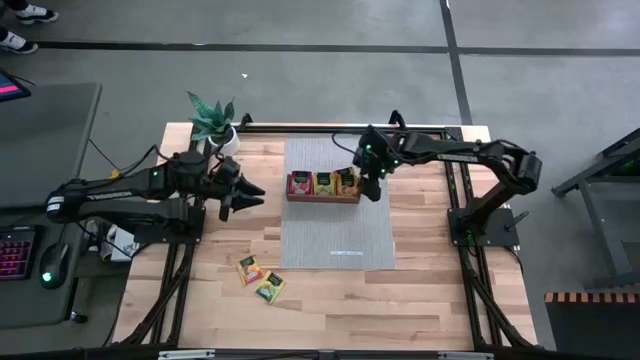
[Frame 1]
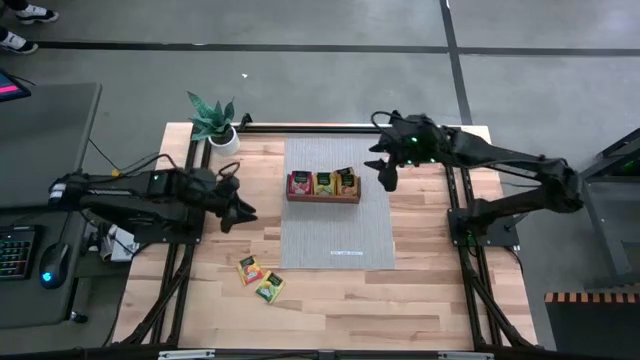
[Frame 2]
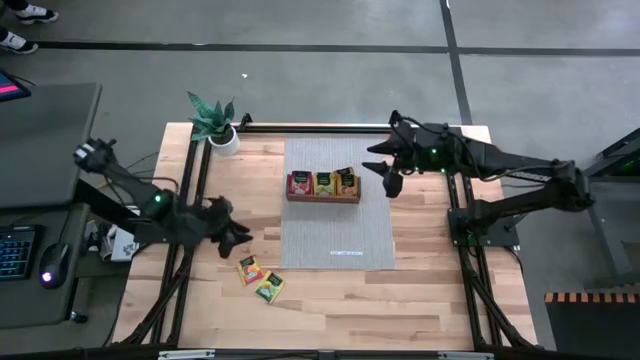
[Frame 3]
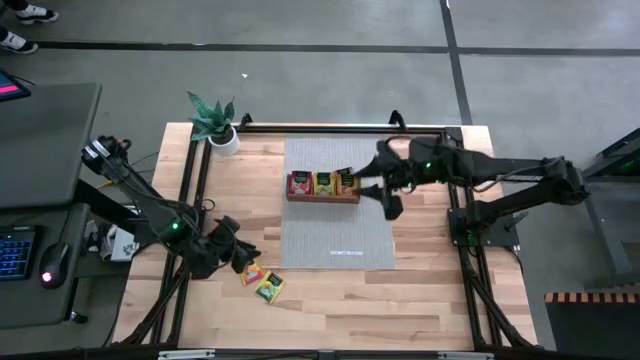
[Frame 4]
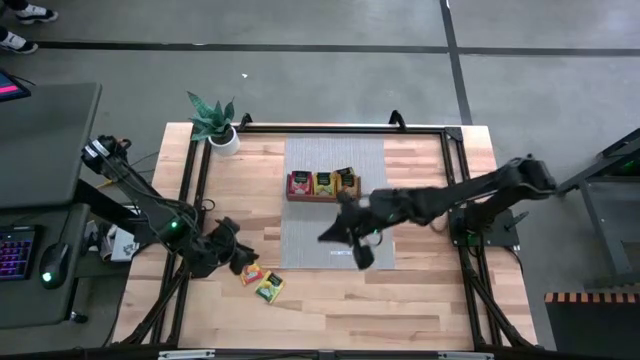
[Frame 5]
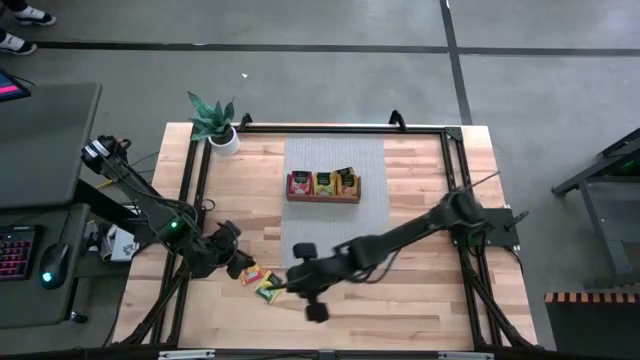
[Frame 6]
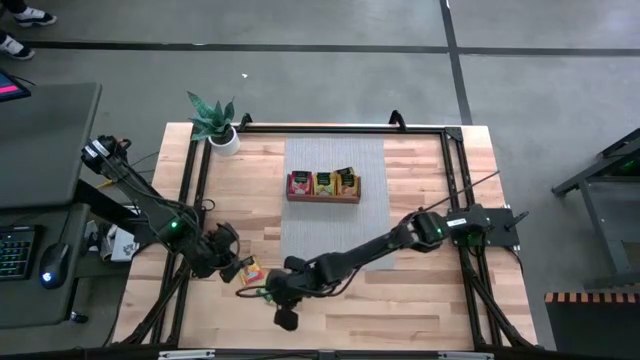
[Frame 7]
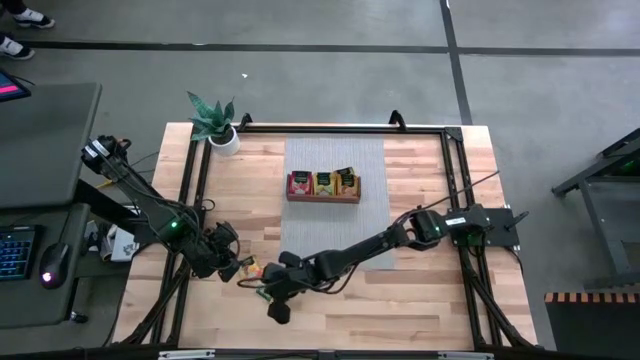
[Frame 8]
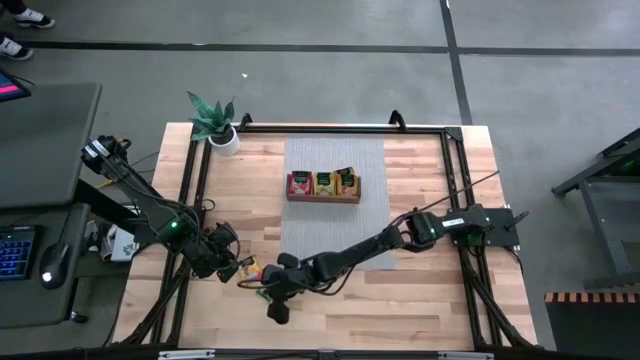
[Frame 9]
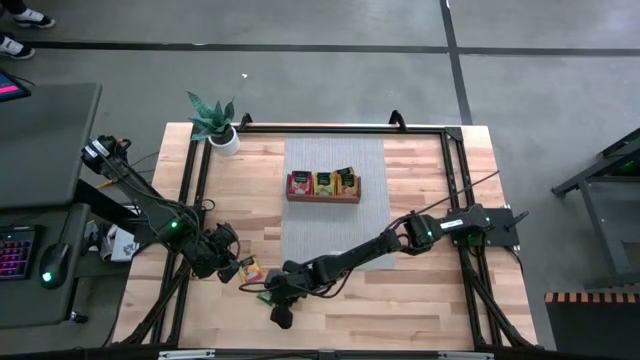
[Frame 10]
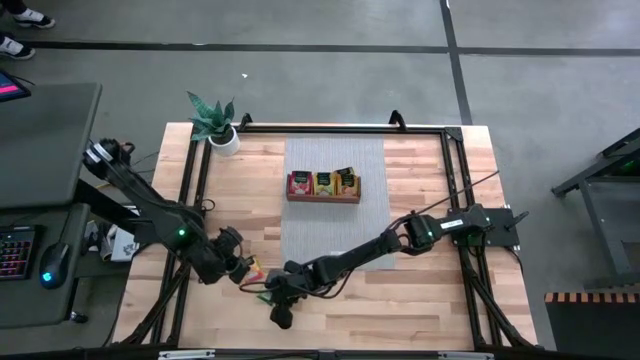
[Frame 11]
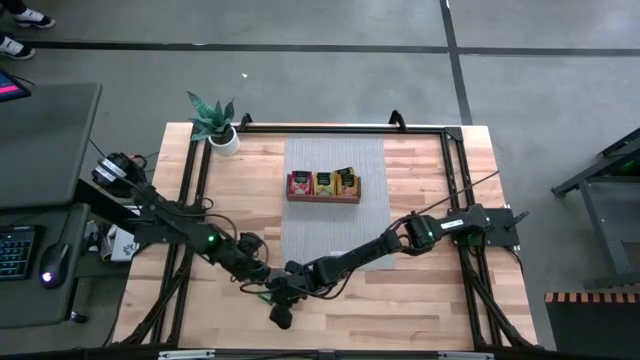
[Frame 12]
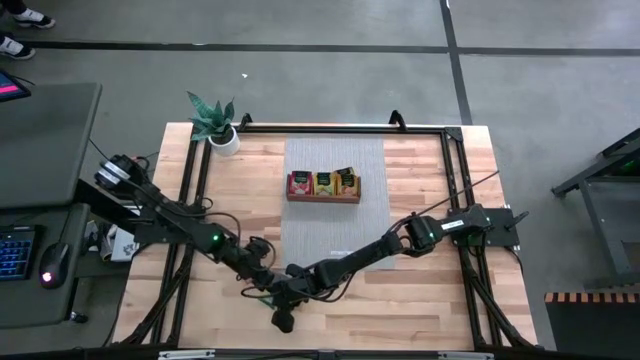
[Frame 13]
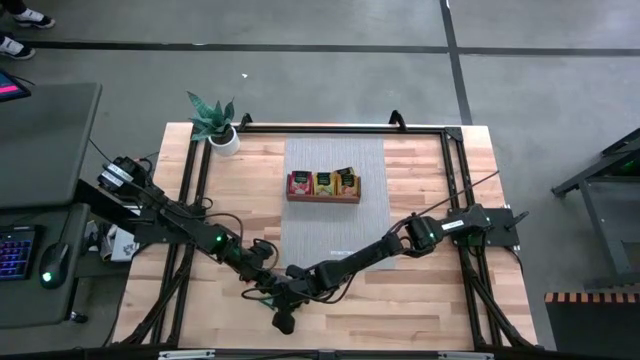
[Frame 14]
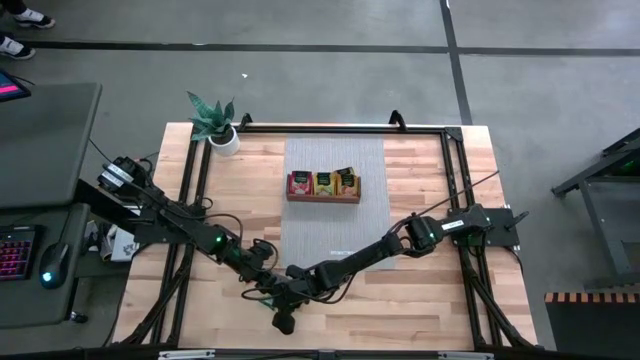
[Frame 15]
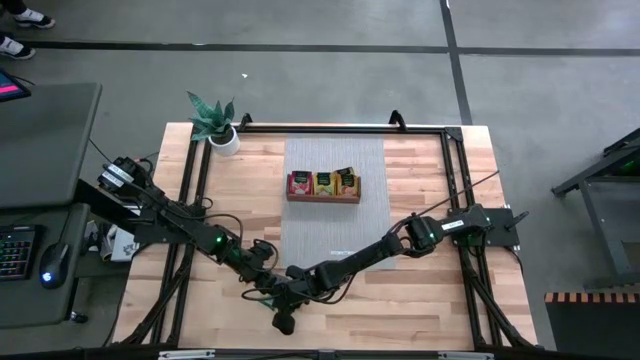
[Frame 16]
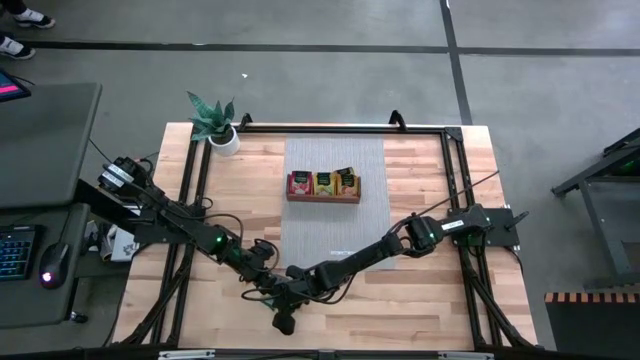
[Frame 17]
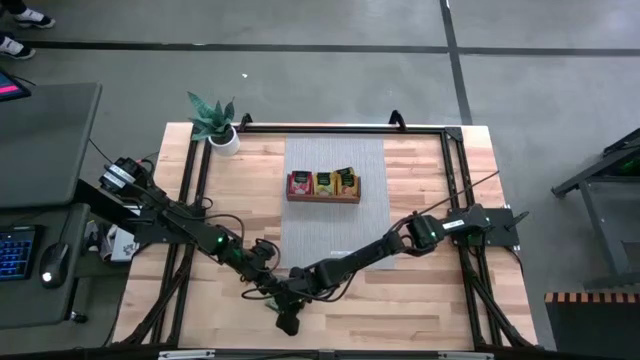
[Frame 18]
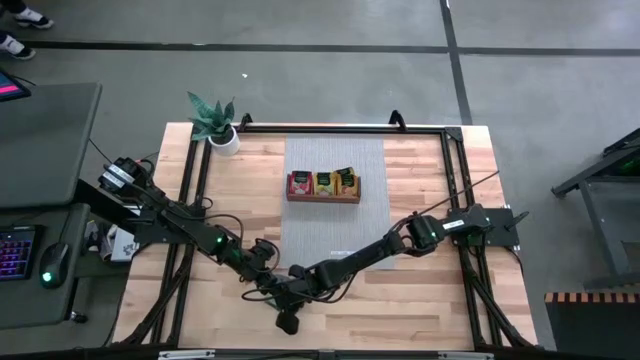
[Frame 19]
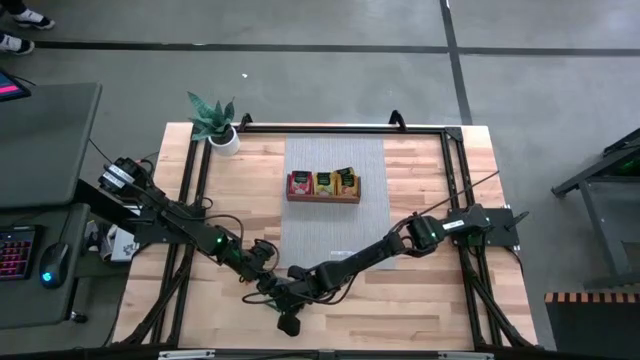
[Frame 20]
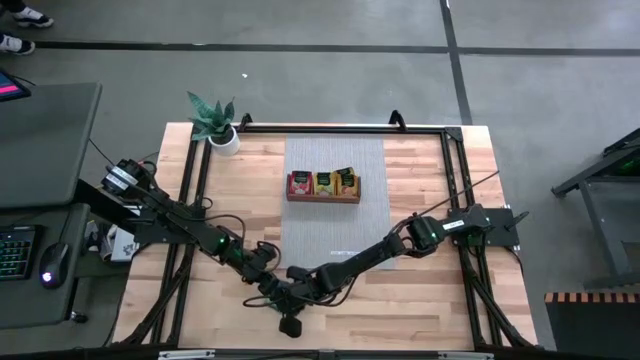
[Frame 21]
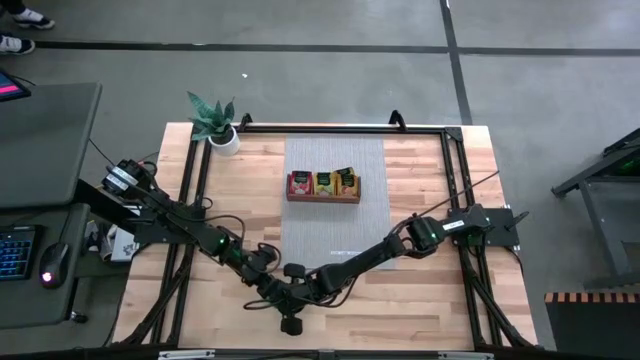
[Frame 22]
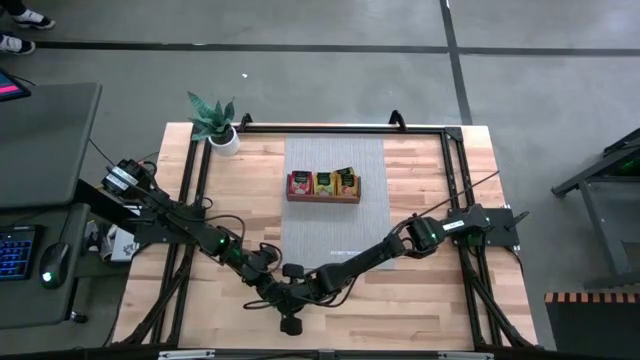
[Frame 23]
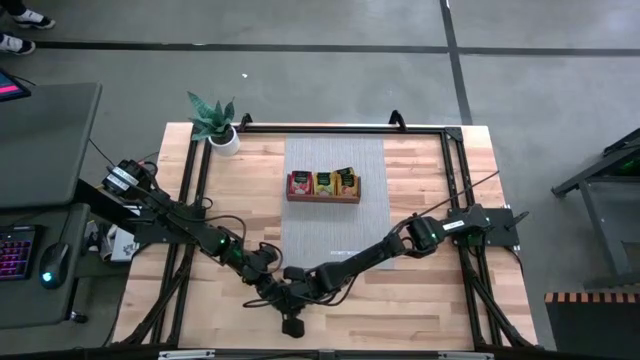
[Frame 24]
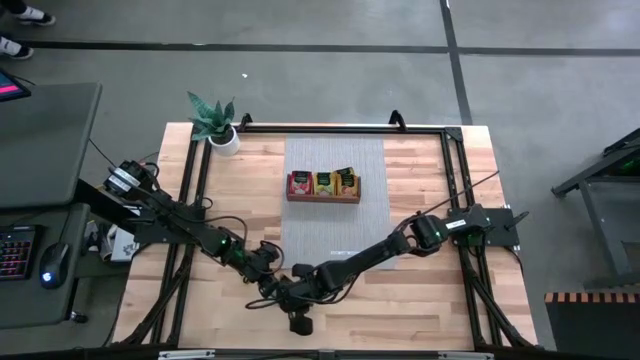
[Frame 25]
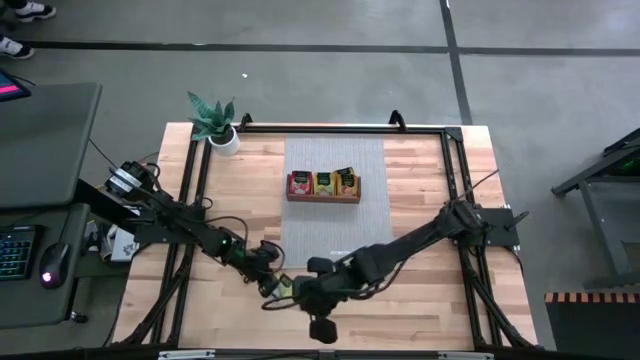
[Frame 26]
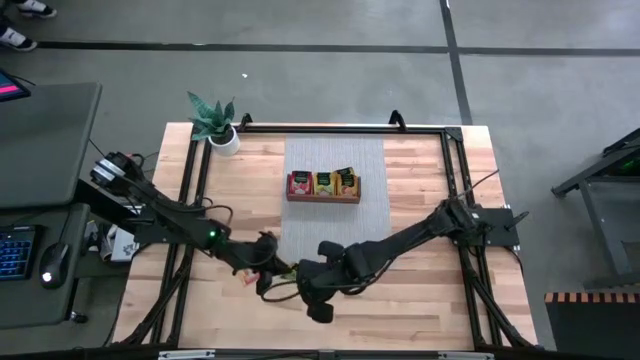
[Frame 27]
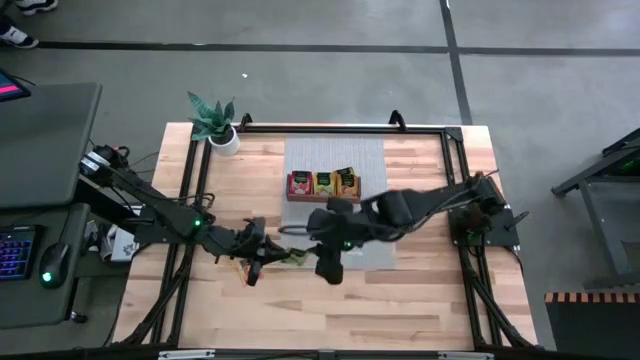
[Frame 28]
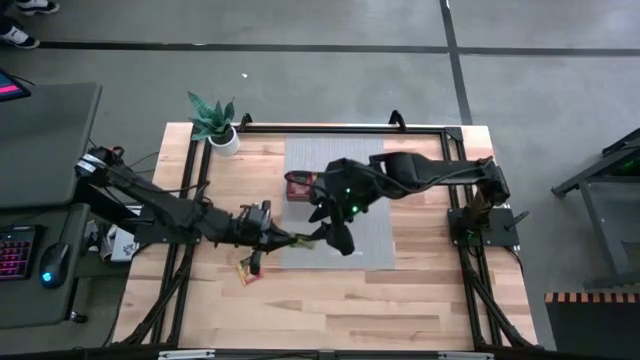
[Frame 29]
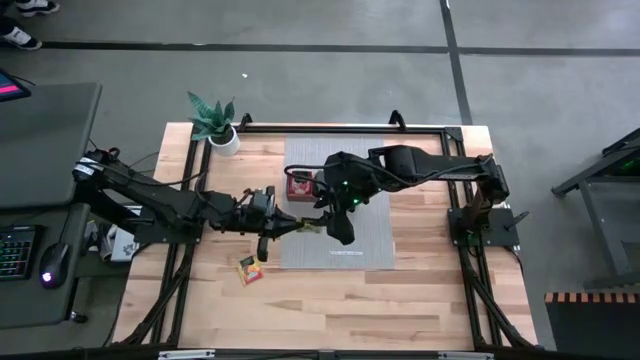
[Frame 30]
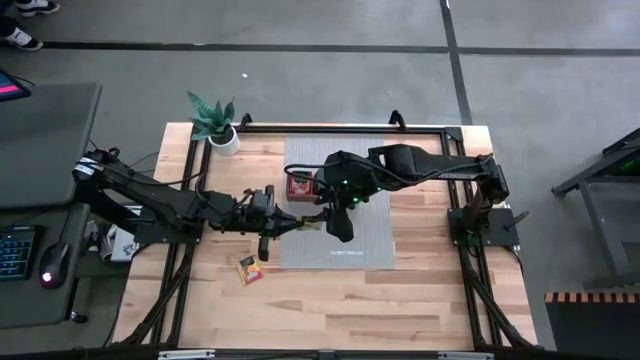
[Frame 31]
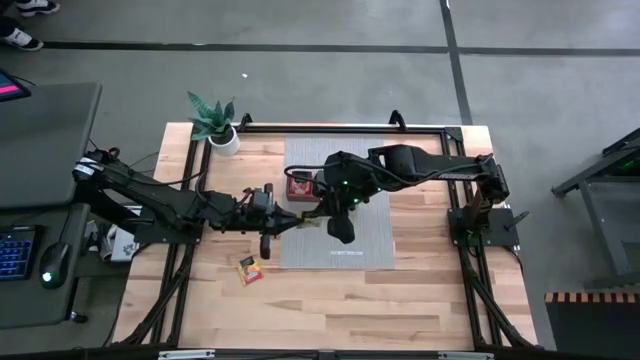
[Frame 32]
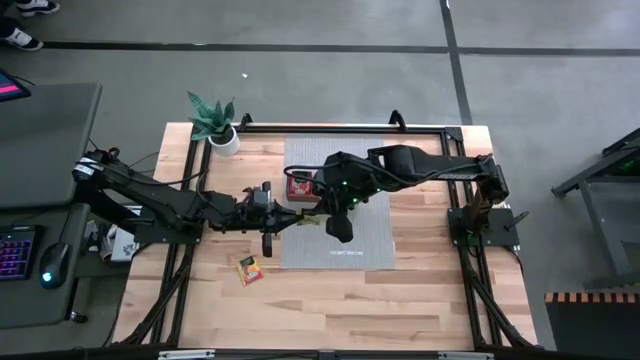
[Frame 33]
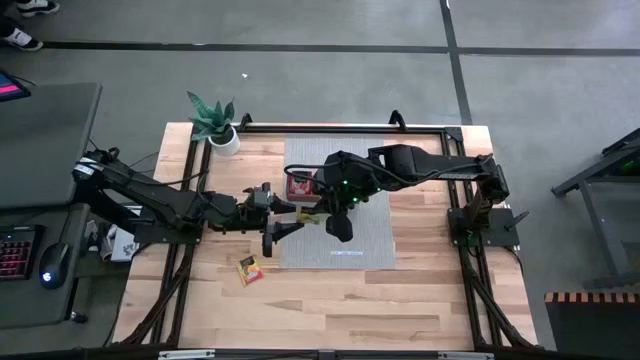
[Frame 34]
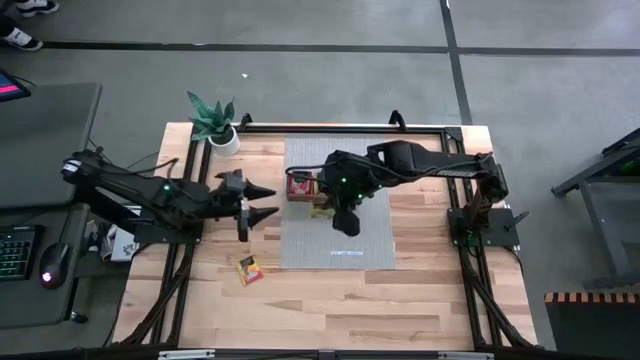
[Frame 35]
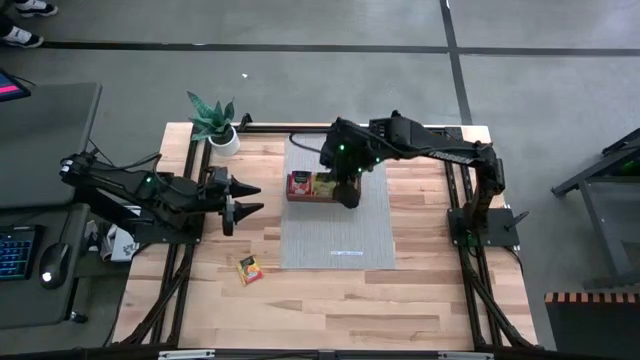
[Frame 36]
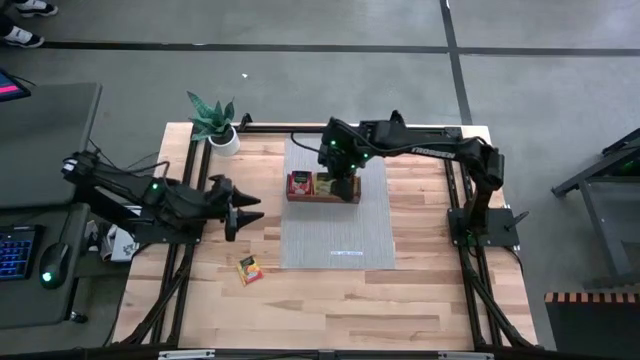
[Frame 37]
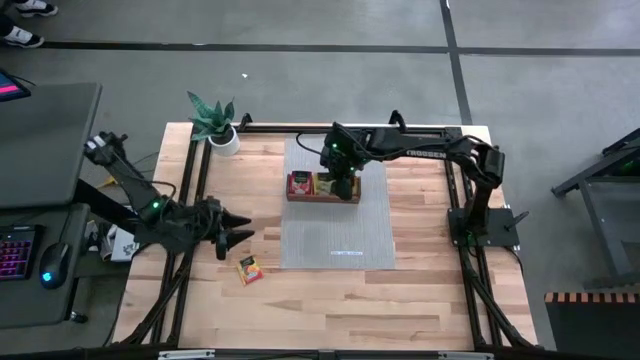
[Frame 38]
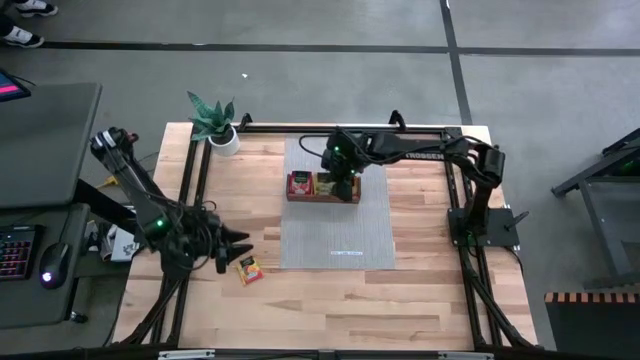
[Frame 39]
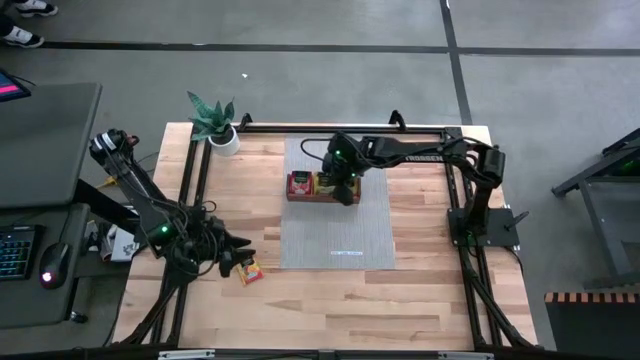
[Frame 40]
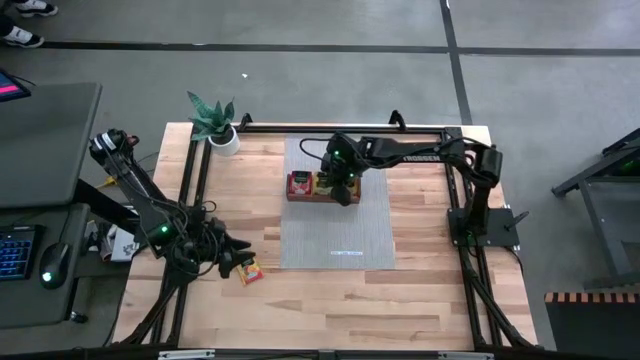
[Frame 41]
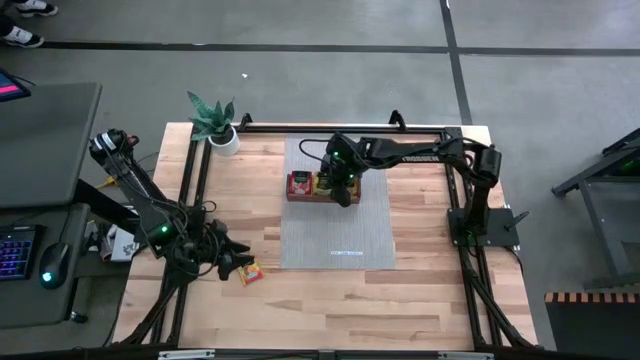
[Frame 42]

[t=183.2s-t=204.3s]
Task: Pick & Place Tea
Put the yellow tea bag into the middle section of the wooden organizer
